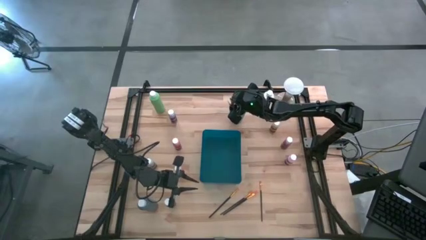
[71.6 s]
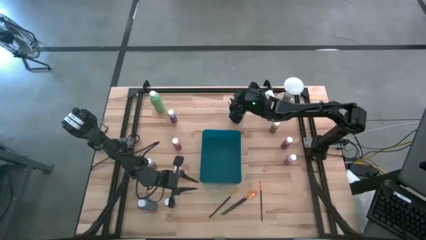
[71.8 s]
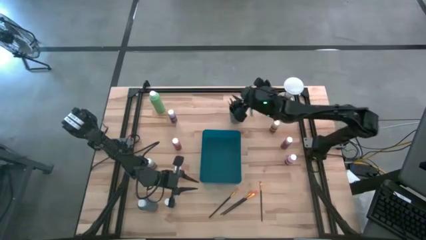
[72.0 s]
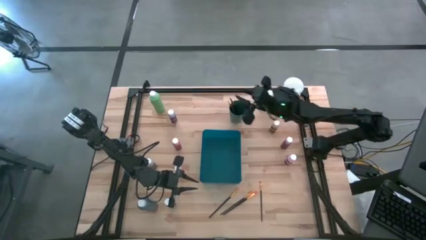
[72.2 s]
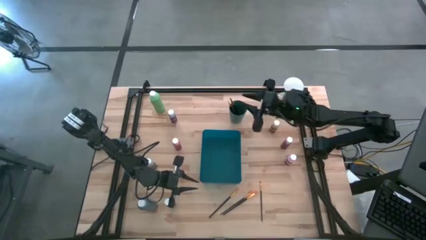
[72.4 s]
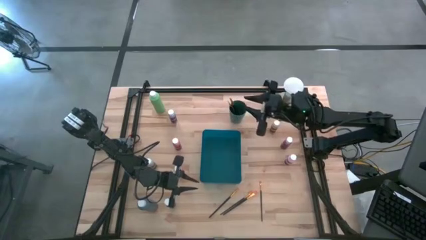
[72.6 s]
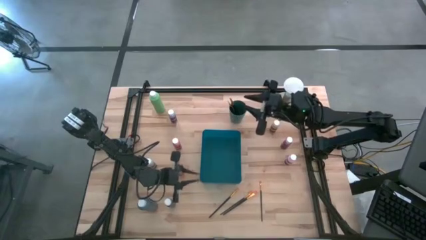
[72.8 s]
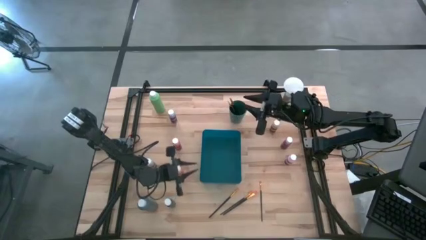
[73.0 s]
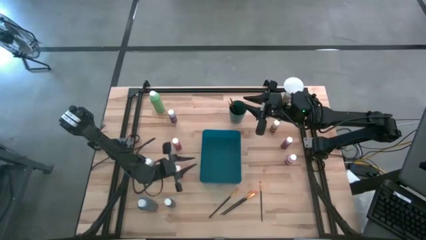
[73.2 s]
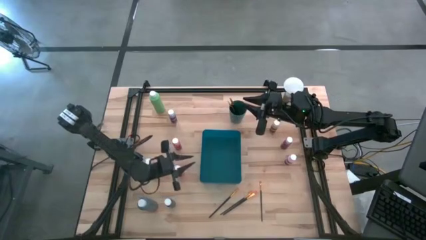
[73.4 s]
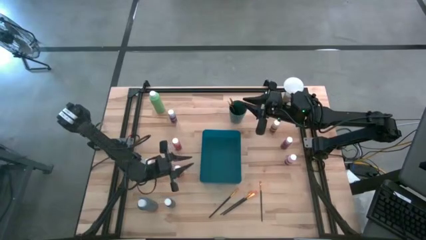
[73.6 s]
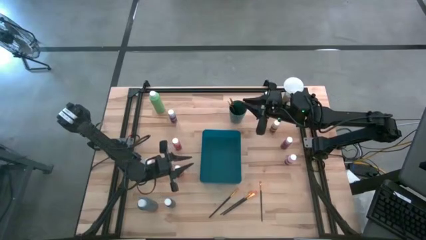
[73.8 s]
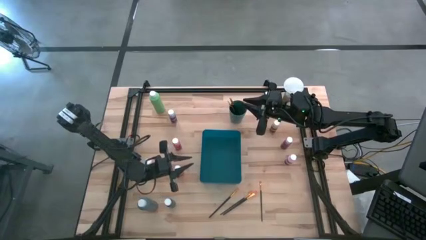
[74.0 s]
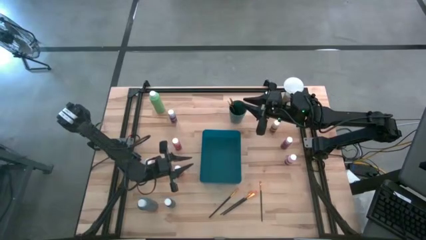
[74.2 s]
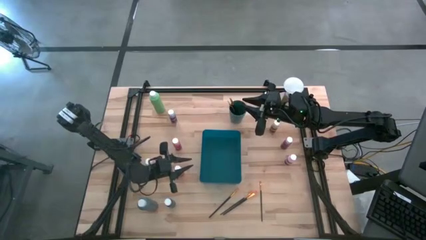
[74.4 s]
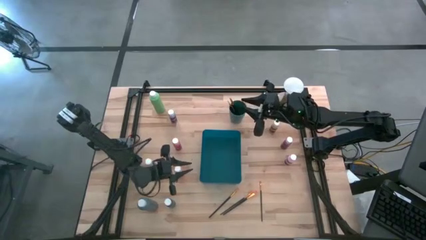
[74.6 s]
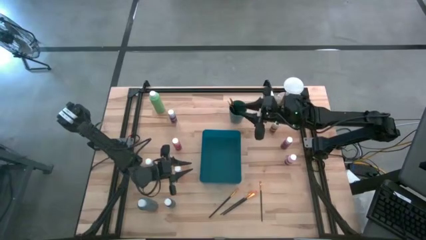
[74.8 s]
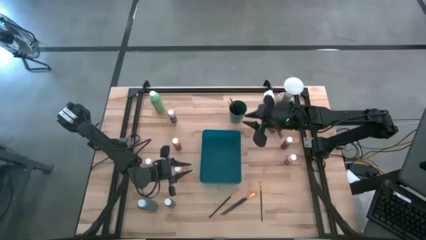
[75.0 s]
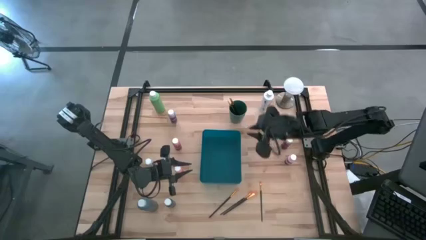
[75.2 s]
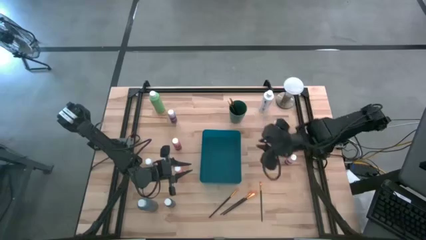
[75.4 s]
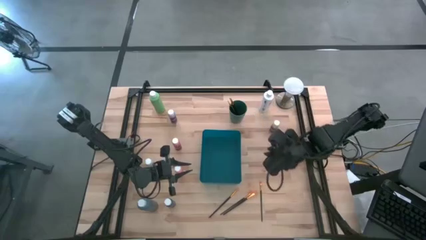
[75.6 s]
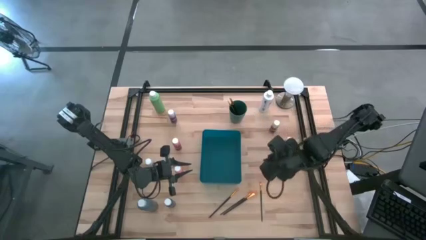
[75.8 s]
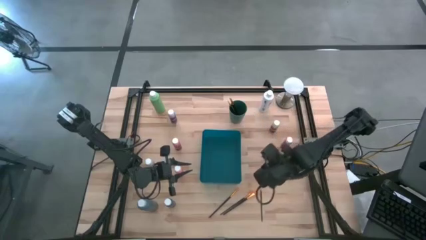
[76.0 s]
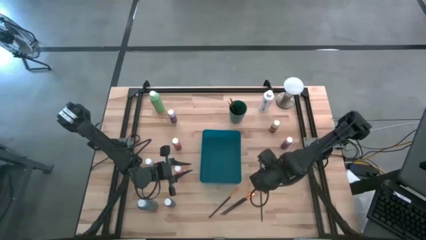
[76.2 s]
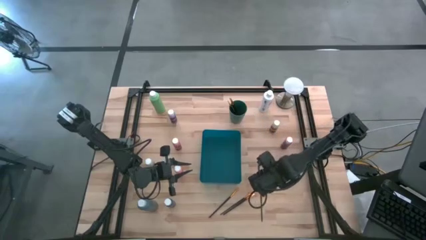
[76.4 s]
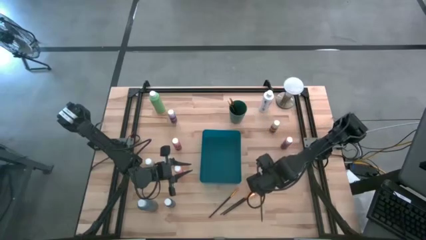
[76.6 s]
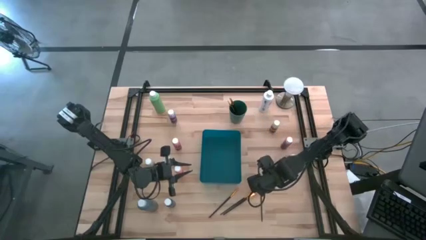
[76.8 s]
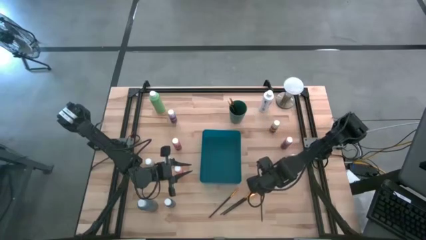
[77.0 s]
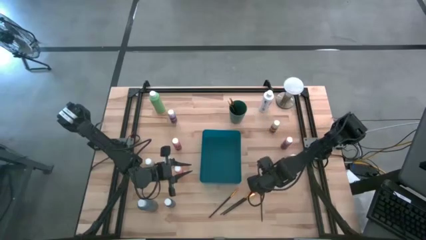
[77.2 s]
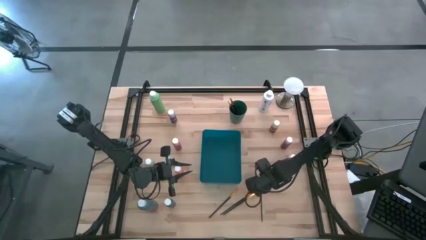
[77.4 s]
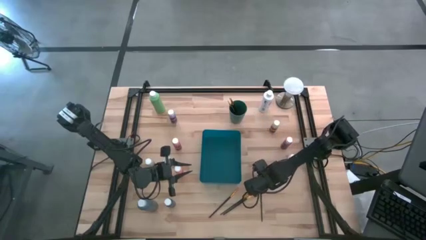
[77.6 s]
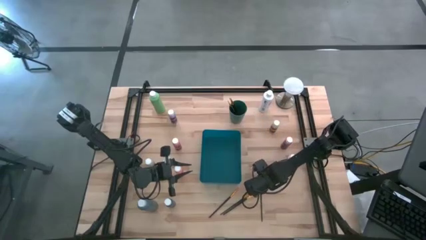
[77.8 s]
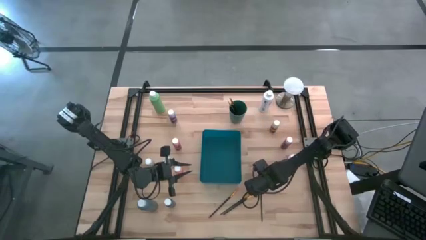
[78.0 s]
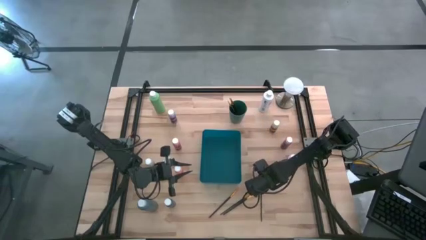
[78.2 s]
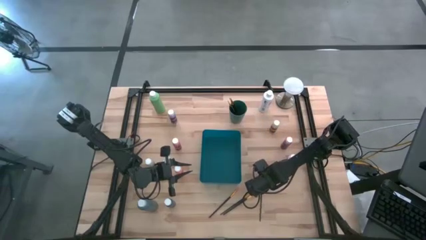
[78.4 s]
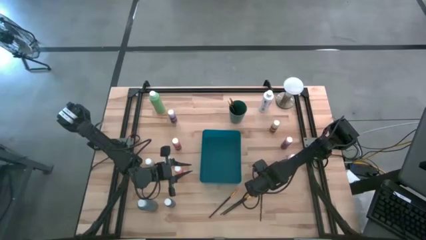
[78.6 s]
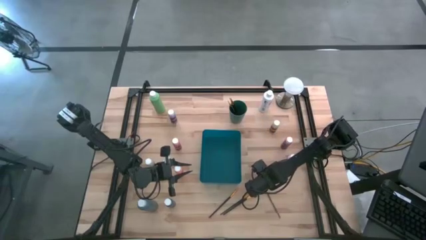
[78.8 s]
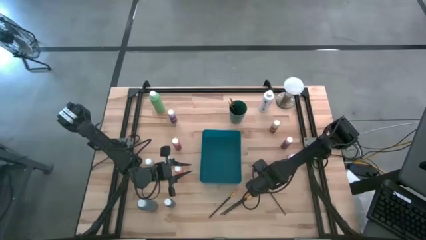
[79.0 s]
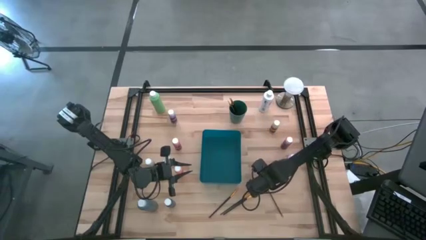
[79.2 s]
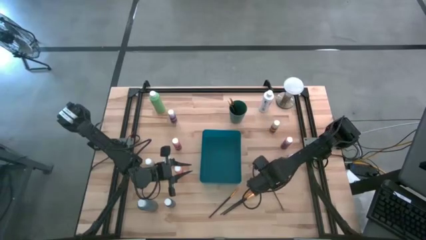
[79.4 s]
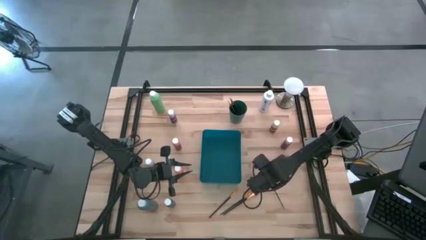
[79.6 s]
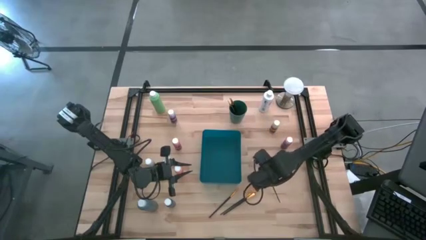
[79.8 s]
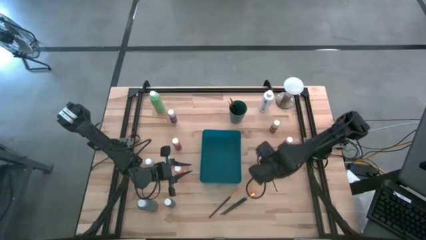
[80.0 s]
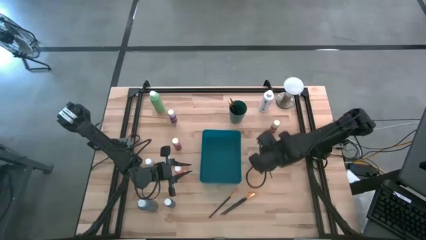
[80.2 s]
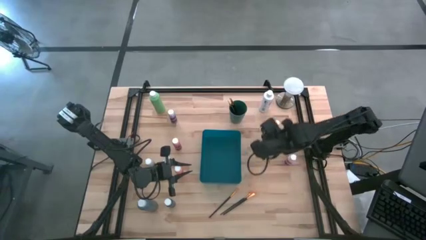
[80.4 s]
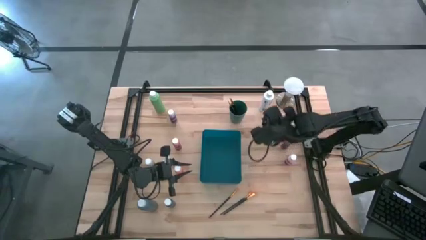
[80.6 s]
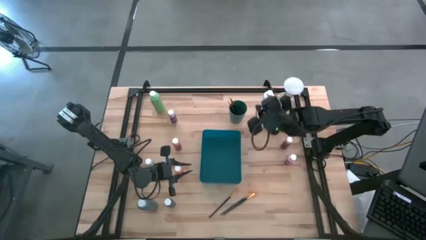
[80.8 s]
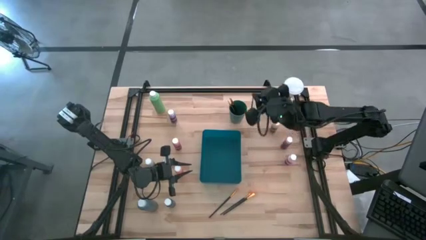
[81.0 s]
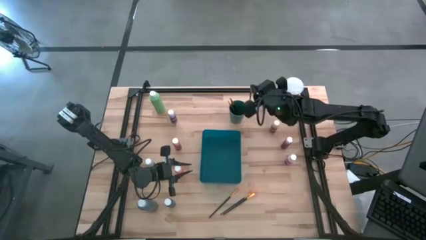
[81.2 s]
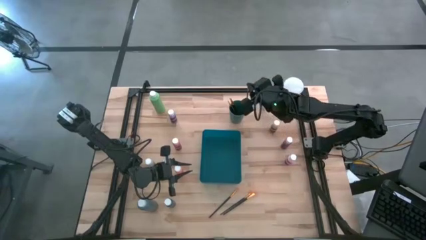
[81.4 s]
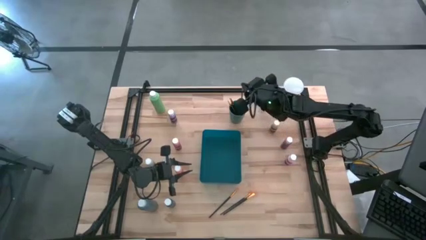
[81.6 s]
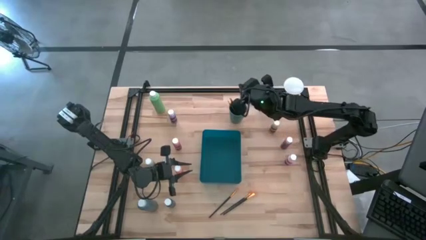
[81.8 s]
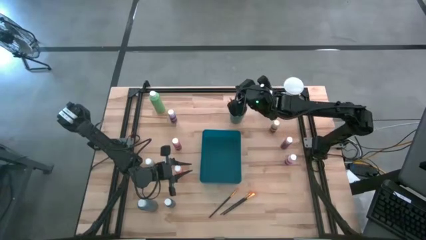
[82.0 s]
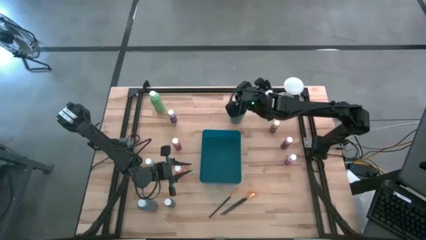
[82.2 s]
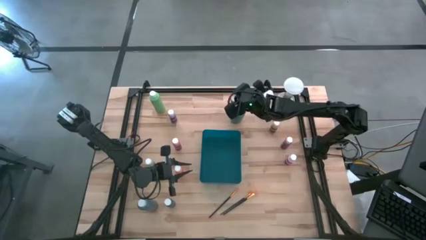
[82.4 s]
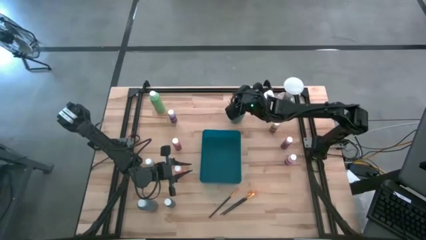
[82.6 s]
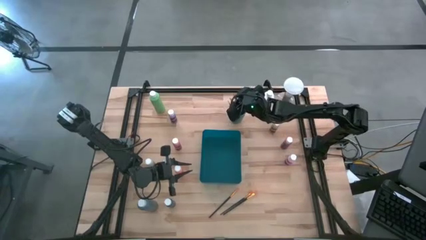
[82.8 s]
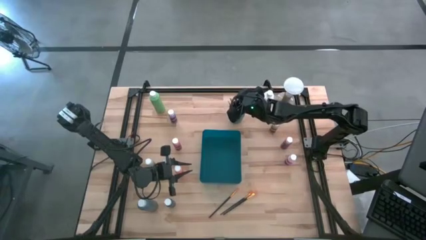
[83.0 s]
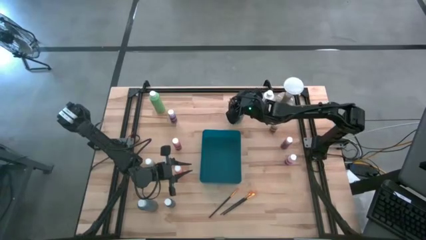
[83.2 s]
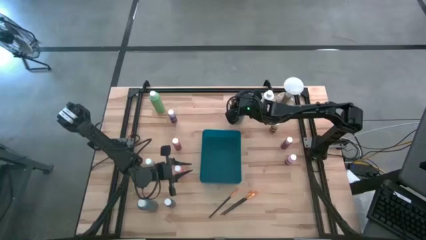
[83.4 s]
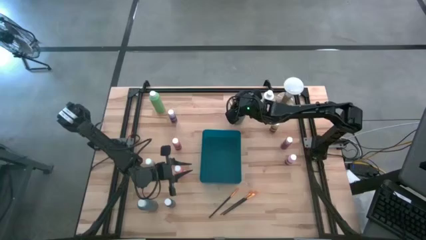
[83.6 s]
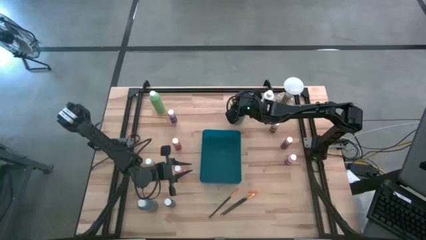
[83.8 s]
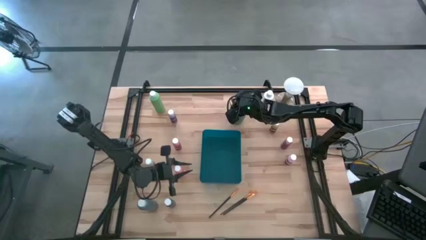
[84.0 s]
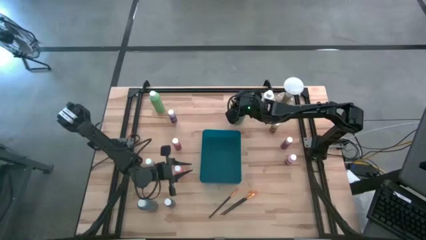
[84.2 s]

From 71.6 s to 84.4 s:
Task: Pick & Place Paint Supplies
Put the gold paint brush into the green cup

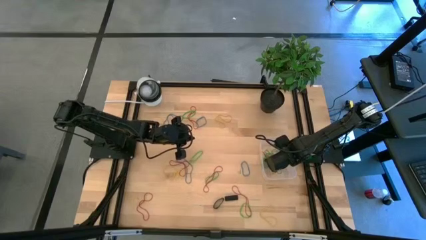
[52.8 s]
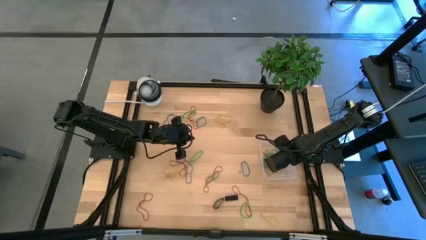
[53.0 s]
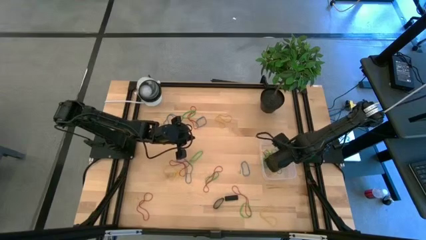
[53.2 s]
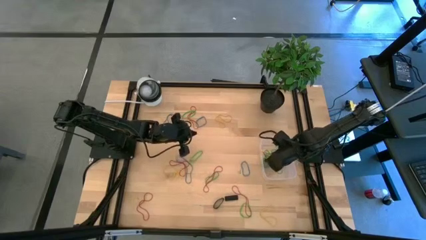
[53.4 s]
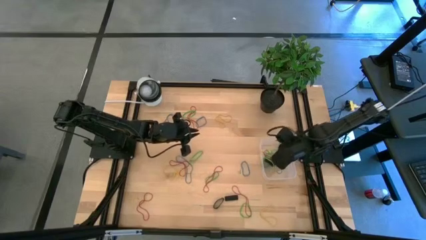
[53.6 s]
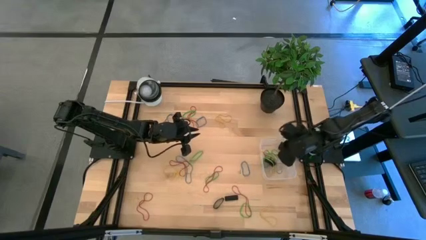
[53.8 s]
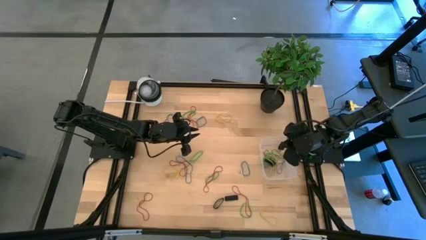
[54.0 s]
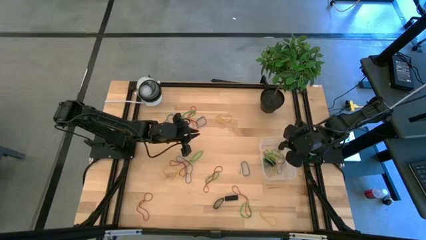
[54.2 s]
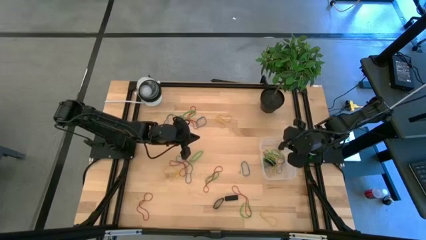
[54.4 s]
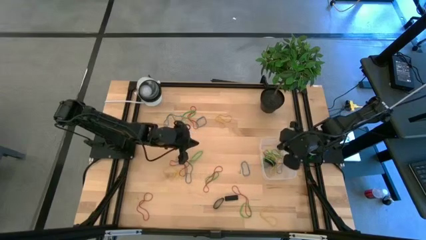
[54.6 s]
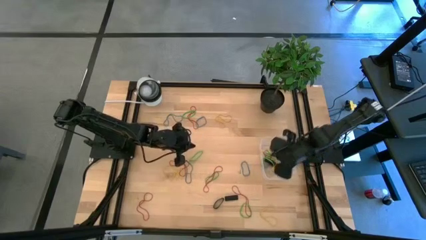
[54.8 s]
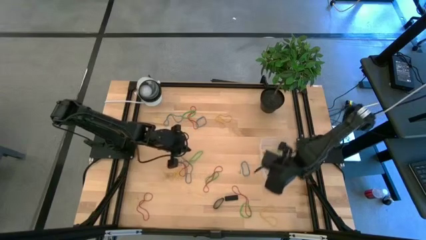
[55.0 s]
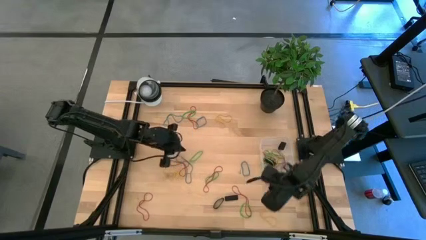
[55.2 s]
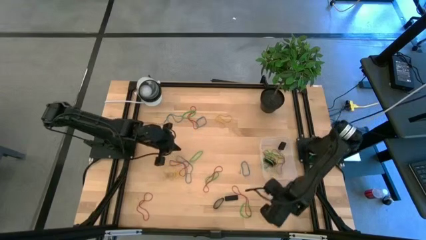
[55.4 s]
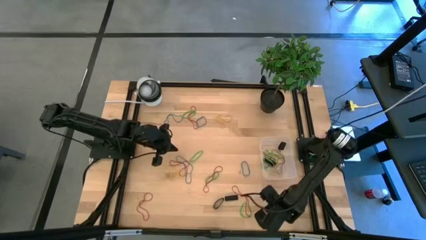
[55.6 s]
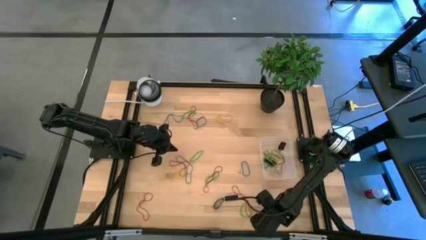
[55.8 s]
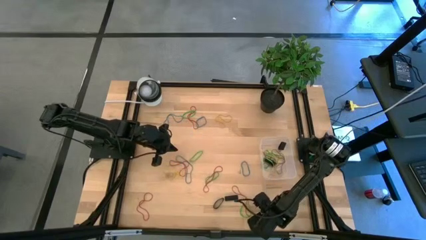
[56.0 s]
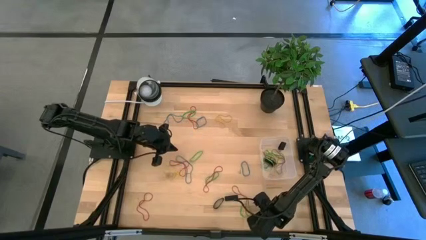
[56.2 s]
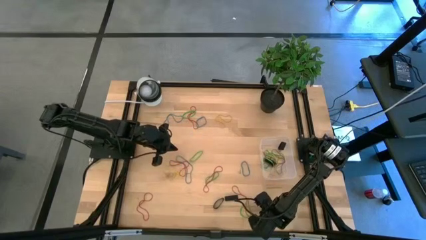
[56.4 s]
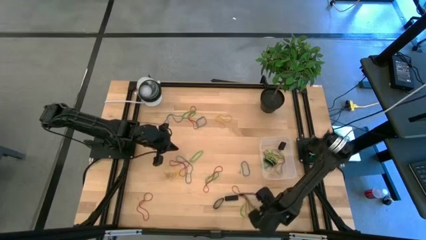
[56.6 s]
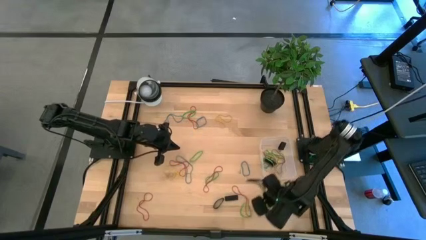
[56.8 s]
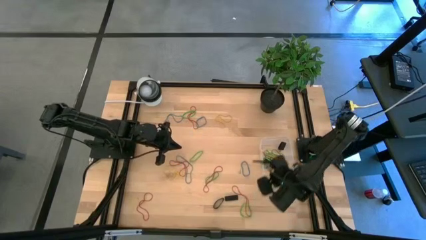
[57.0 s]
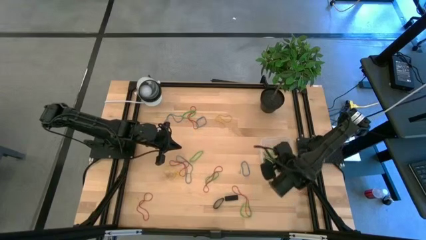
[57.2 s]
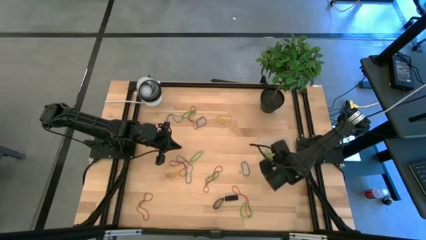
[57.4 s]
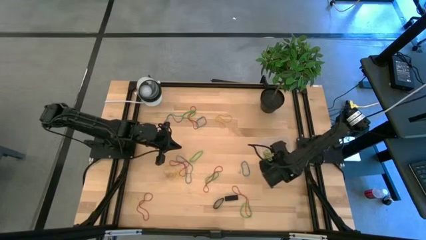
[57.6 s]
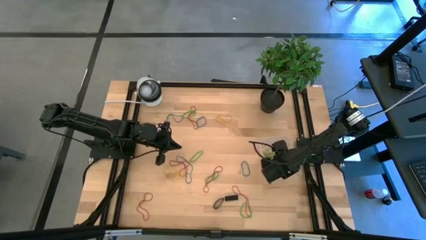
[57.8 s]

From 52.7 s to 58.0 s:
Task: Pick and place rubber bands into bin
Put the yellow rubber band into the transparent bin
